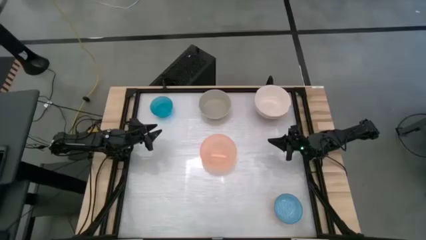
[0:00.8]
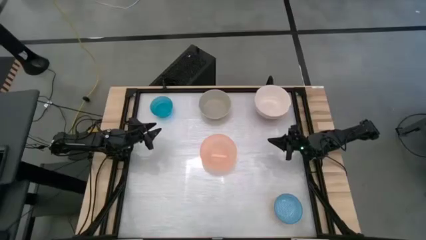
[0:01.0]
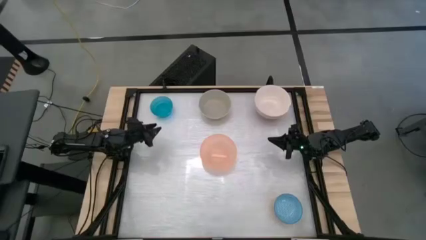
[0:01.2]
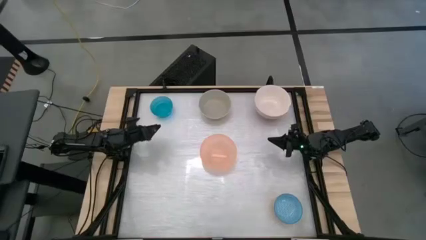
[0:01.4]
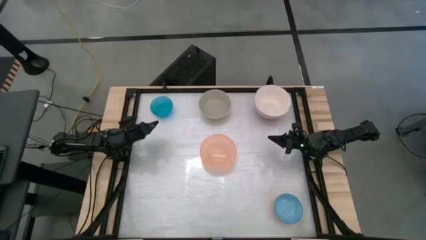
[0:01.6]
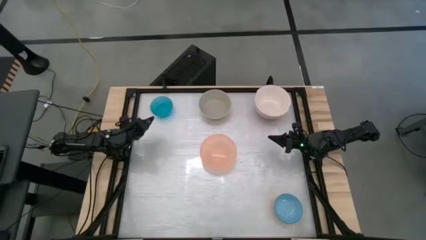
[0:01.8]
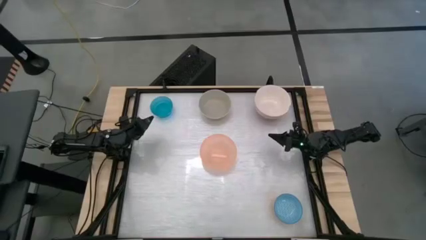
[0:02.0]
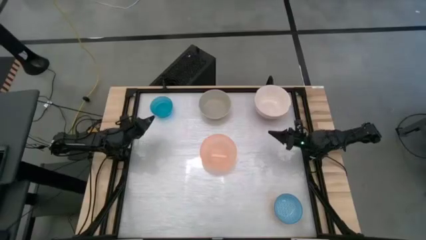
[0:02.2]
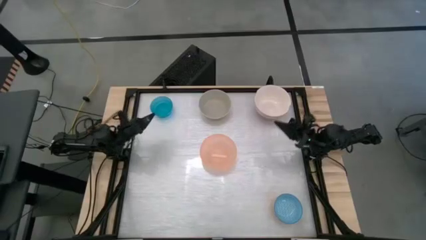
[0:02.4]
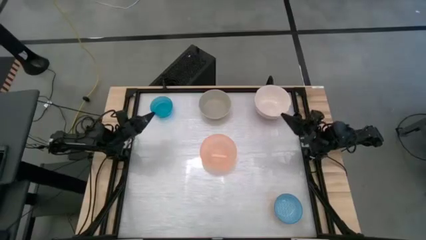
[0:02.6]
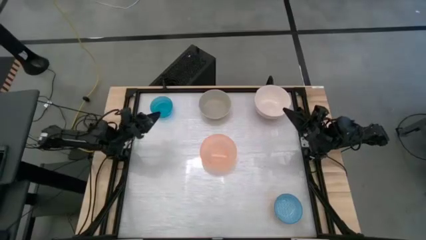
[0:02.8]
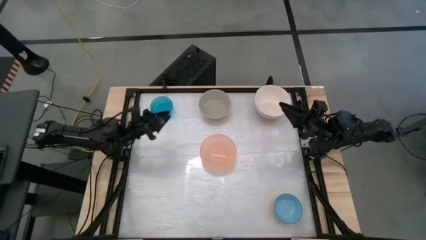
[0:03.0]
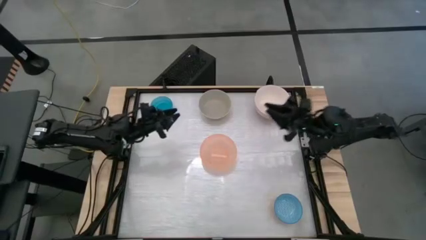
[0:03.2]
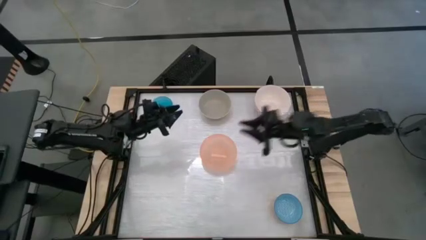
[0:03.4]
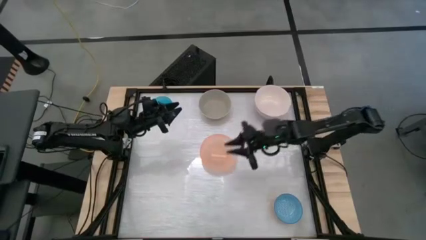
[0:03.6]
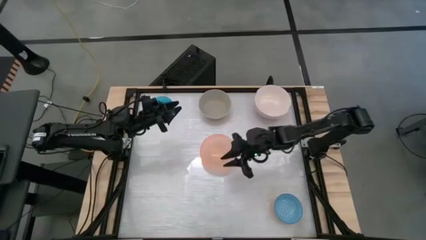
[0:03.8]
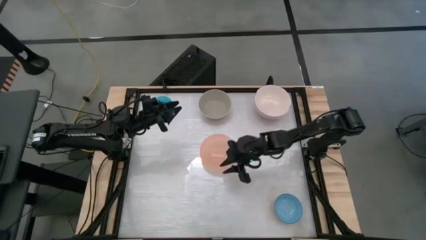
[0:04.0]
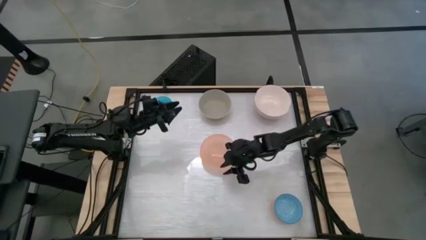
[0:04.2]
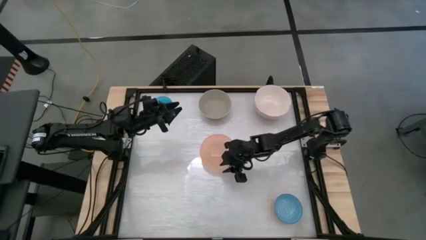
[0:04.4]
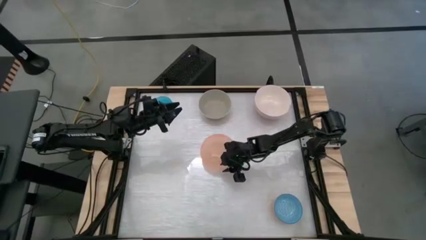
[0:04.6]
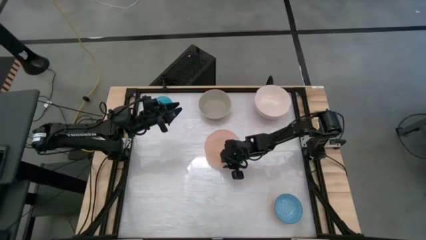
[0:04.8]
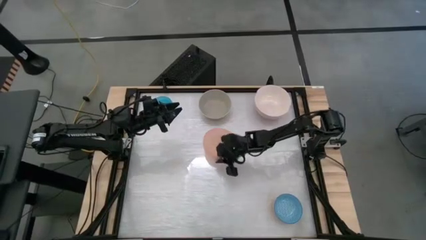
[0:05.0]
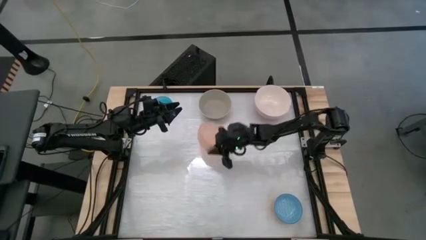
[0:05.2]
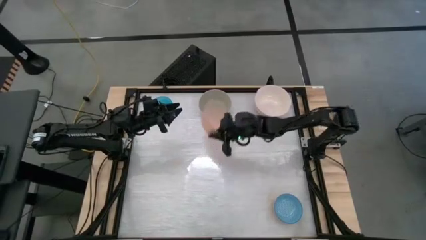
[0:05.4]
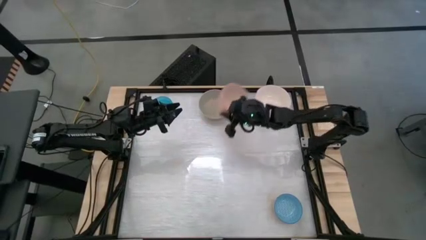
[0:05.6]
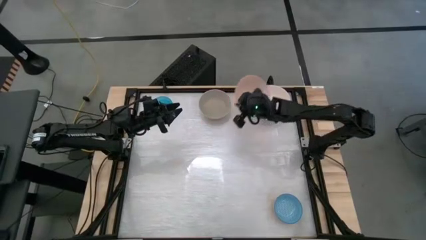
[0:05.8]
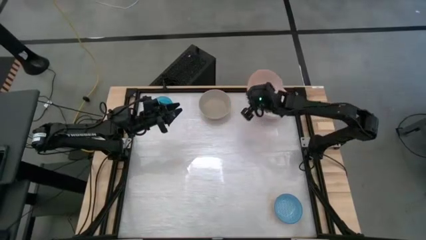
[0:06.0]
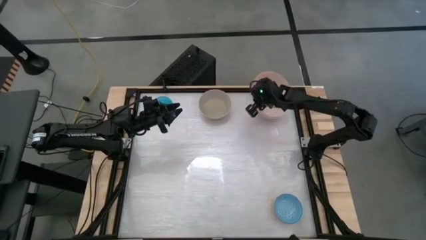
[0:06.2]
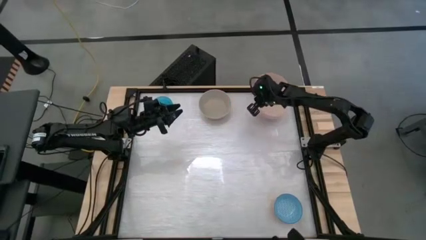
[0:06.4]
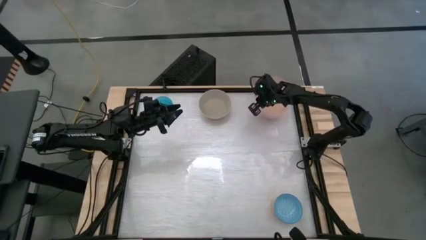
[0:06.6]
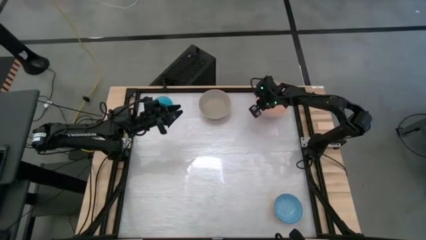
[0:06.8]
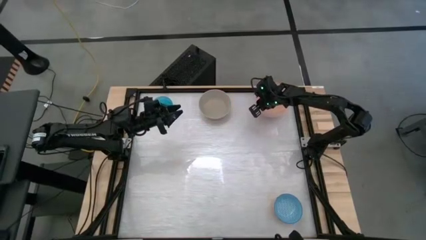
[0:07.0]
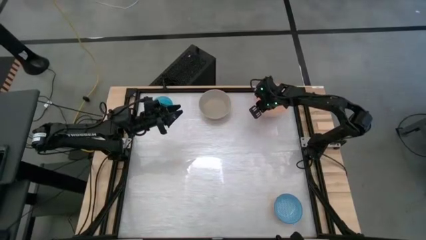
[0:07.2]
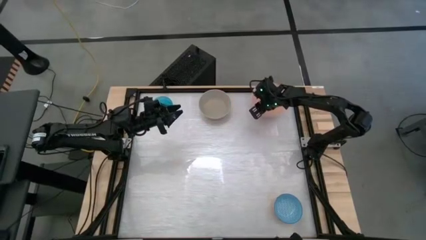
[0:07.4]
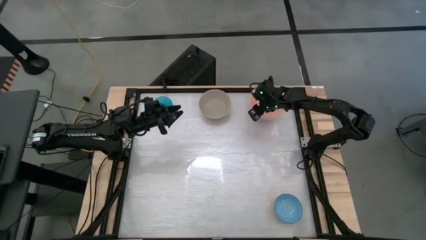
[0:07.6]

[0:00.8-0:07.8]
Stack the orange bowl on top of the white bowl

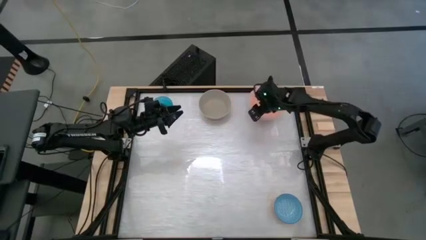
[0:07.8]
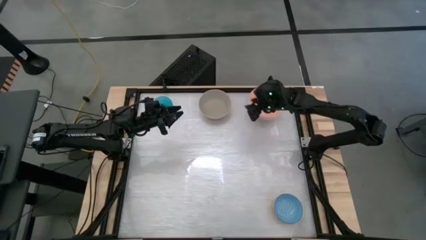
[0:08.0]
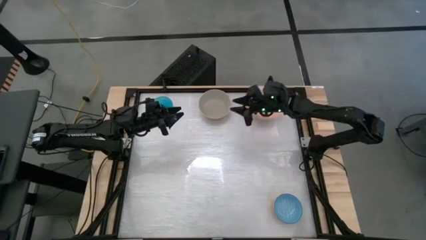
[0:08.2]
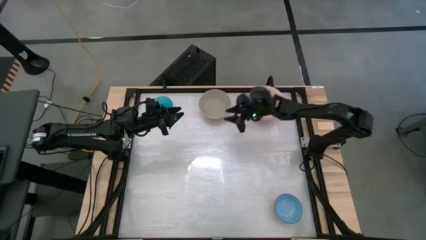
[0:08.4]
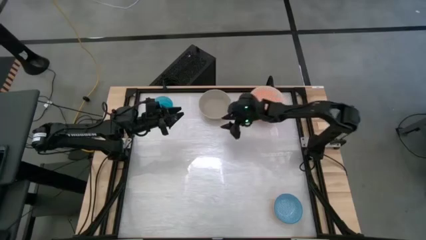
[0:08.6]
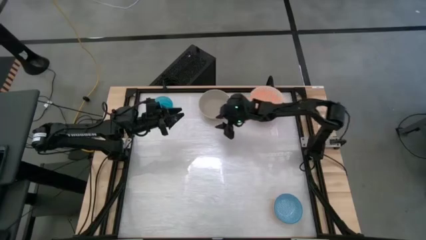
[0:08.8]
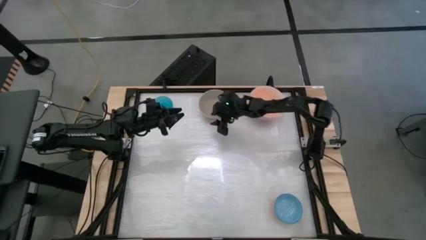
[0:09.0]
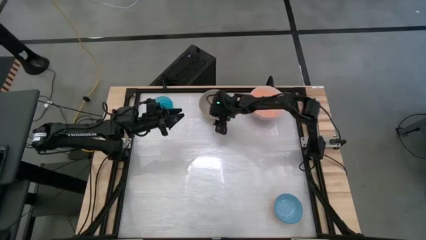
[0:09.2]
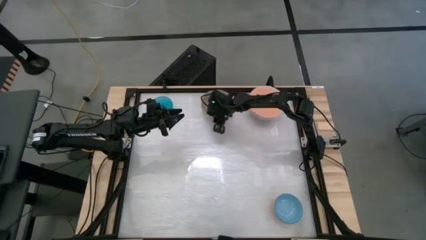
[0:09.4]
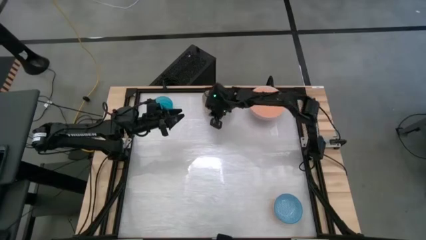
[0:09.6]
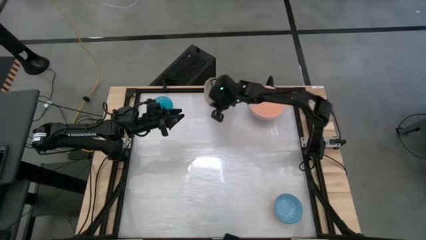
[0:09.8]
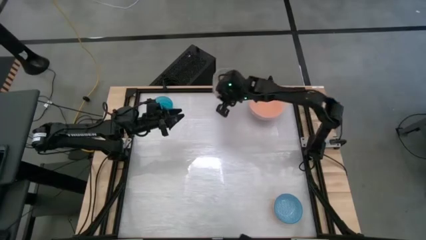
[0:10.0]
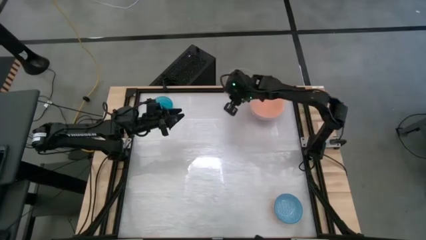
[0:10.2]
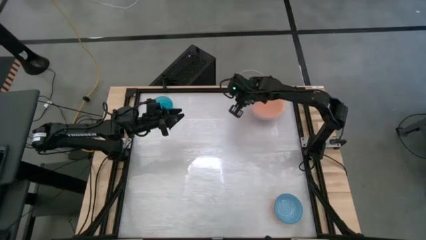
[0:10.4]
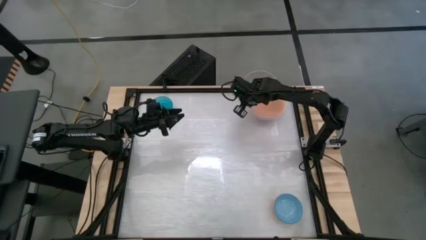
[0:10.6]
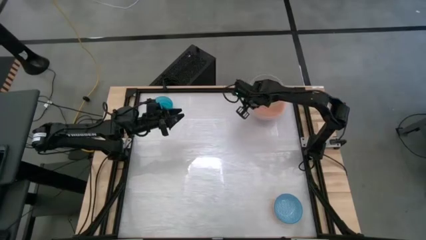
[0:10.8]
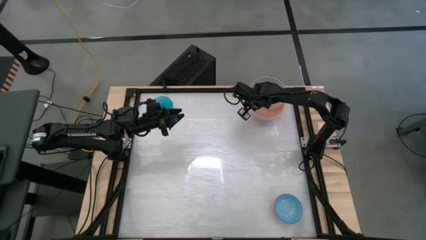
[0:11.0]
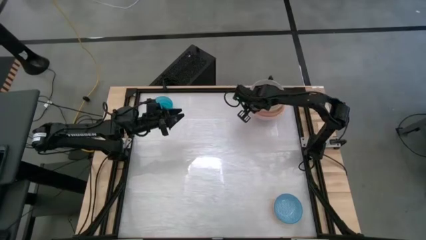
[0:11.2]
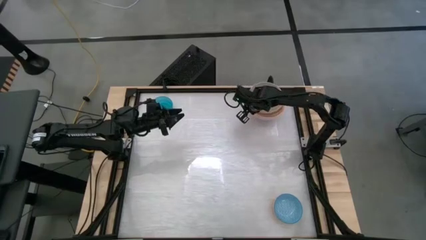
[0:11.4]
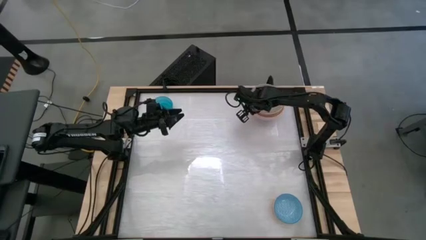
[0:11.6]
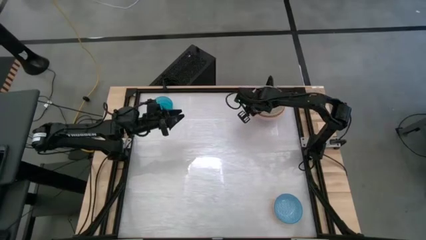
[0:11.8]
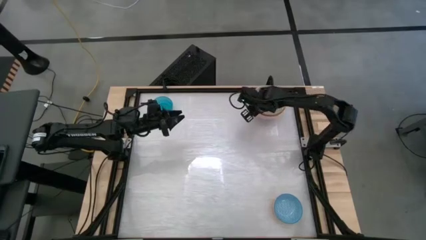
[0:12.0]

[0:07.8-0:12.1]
Stack the gray bowl on top of the orange bowl

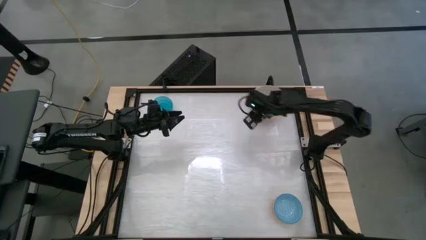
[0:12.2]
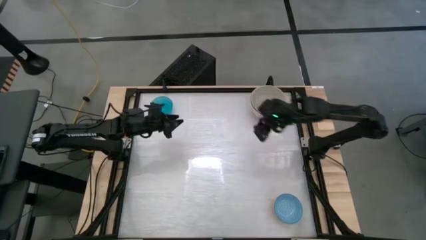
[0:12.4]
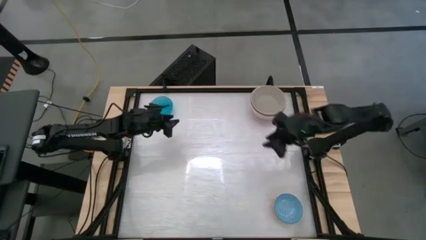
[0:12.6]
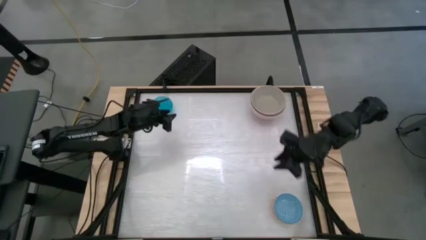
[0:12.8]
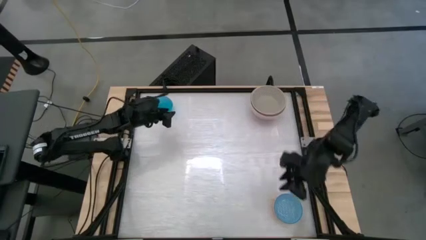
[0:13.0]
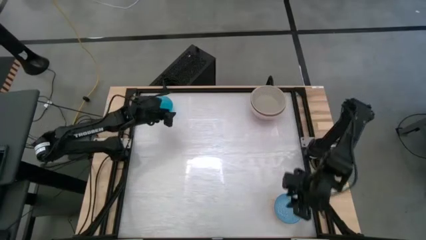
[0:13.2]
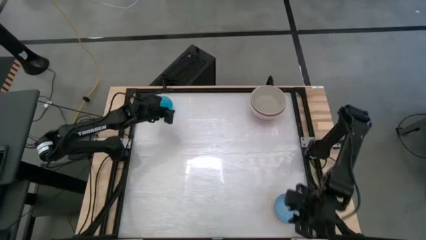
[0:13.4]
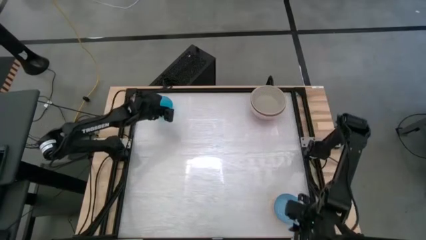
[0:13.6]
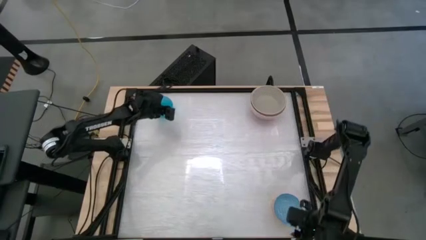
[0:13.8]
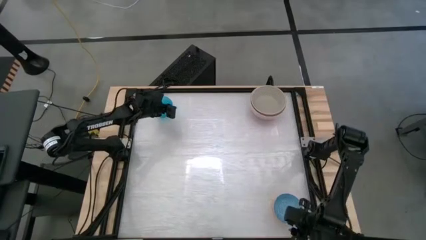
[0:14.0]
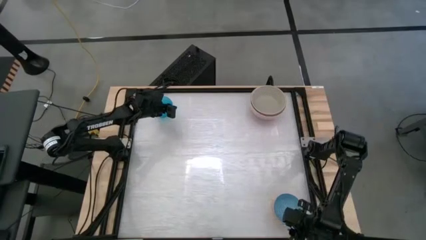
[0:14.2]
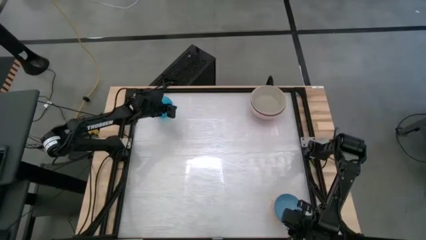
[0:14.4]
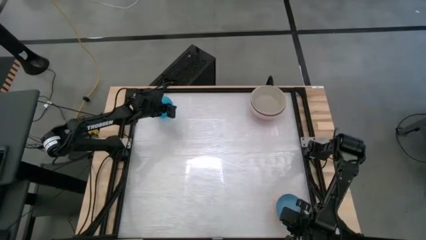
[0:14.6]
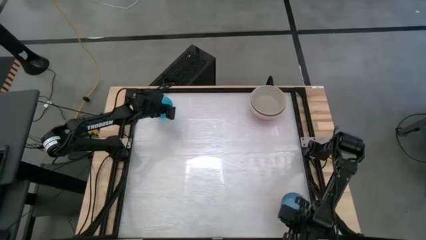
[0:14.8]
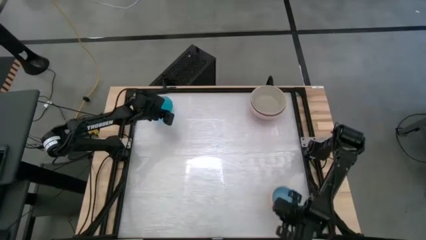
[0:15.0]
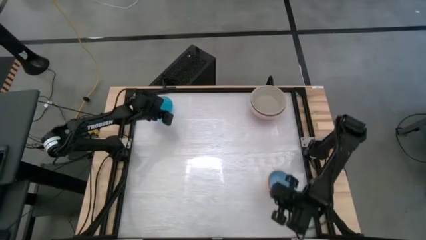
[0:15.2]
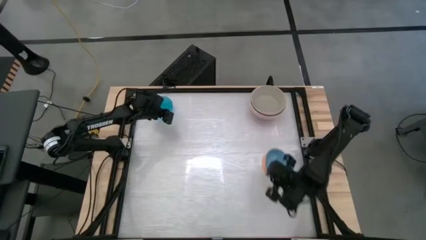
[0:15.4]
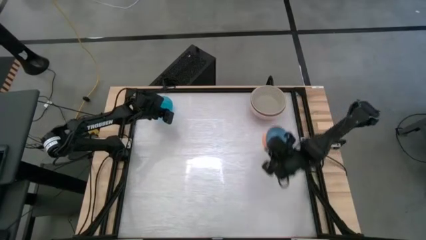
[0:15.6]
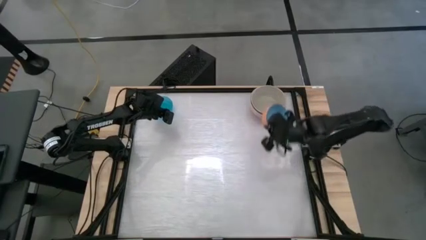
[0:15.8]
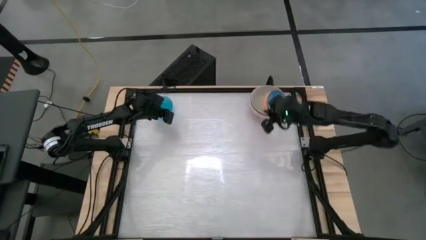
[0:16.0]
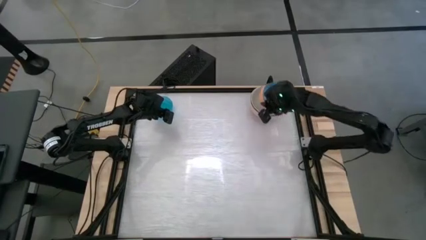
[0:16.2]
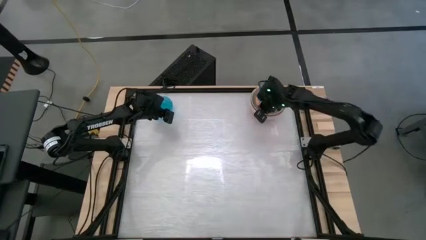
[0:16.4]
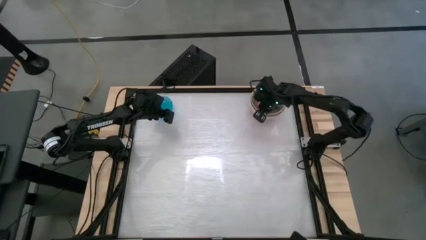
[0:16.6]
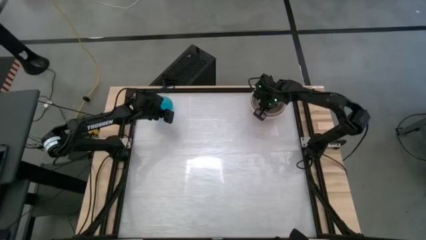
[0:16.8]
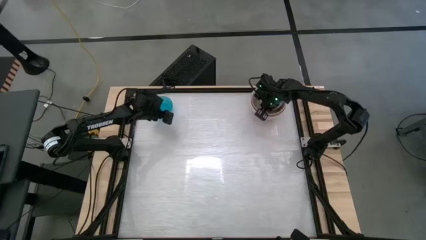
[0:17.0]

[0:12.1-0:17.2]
Stack the blue bowl on top of the gray bowl
